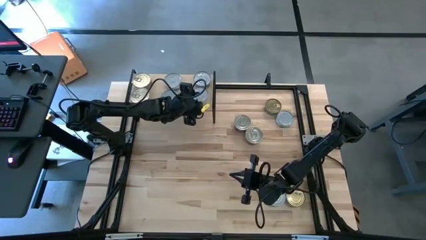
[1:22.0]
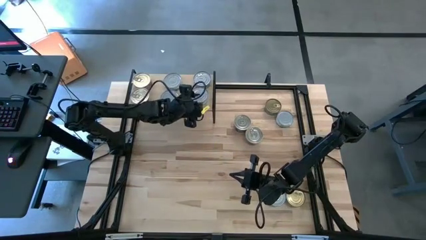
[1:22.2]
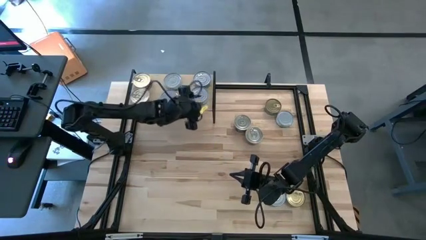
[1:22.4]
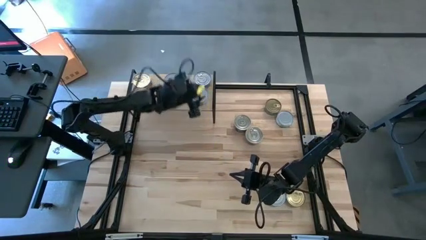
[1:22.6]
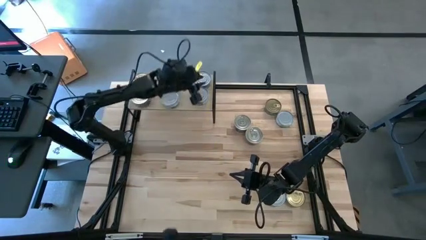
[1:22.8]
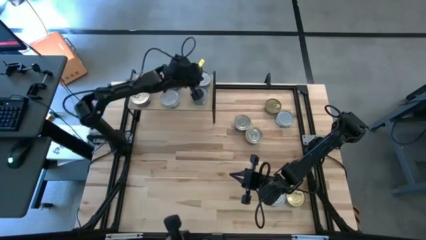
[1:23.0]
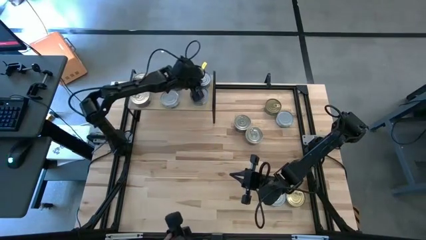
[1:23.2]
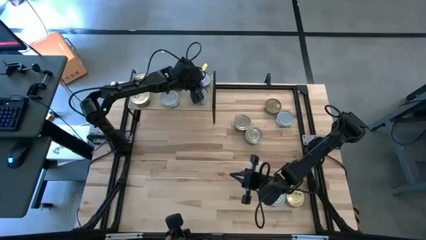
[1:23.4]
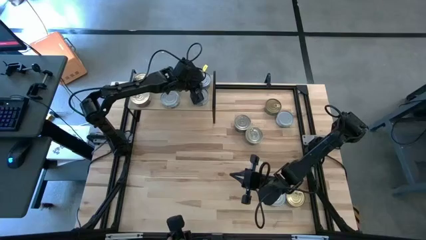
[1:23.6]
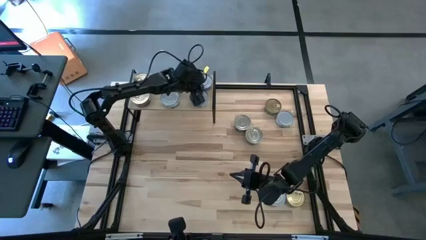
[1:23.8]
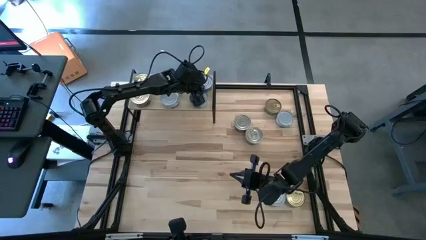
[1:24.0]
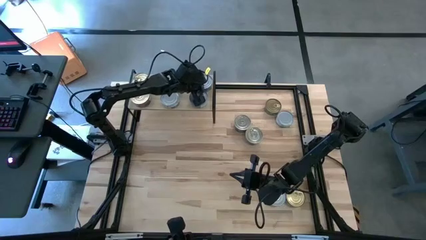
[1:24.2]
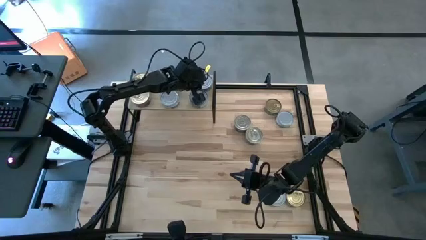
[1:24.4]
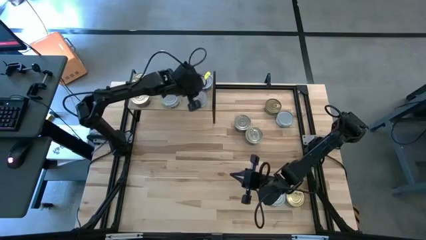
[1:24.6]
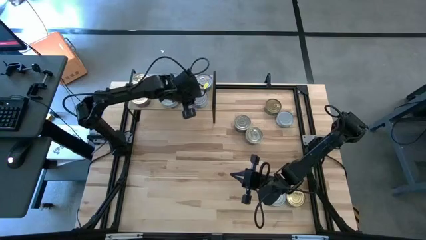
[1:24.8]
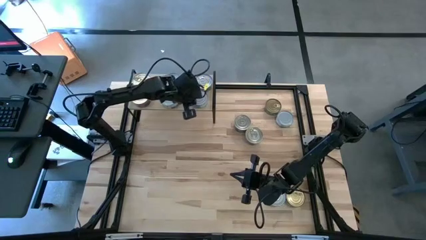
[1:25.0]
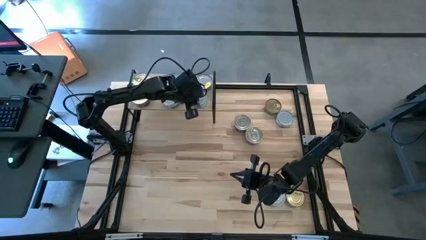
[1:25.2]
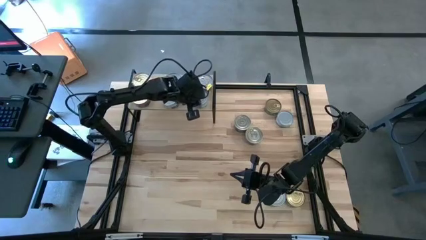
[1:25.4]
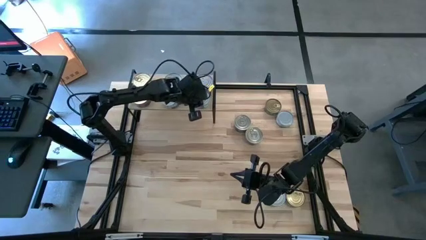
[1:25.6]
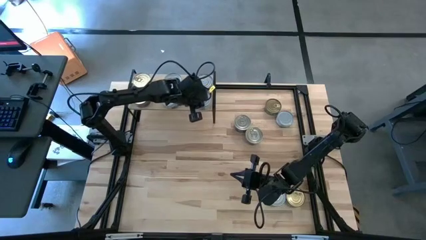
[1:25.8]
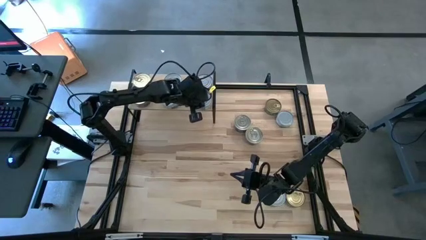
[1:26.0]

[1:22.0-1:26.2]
Task: Stack canned seafood by type on shelf
Adjust the green blue tuna cans on the shelf

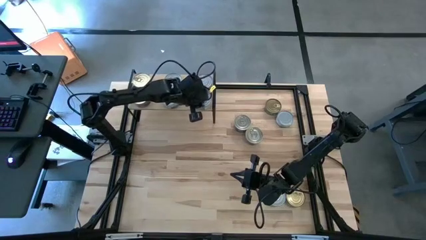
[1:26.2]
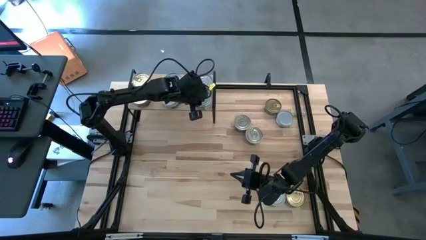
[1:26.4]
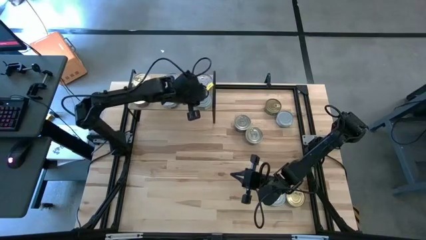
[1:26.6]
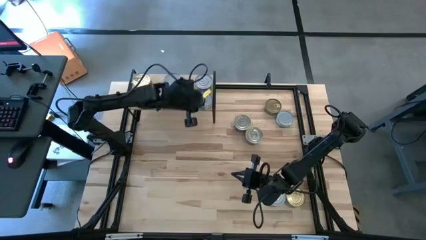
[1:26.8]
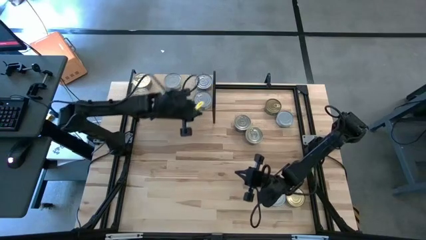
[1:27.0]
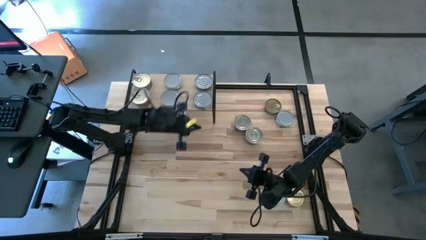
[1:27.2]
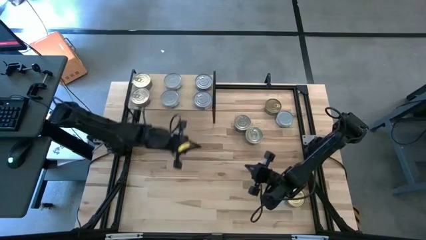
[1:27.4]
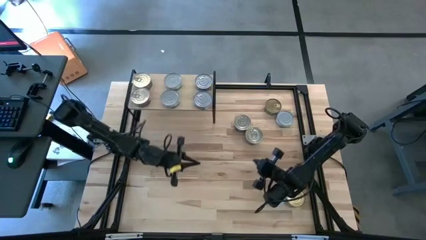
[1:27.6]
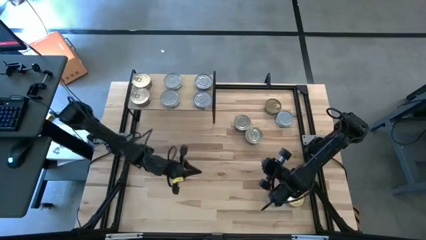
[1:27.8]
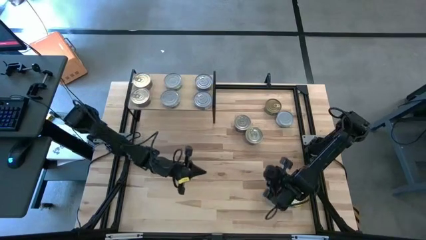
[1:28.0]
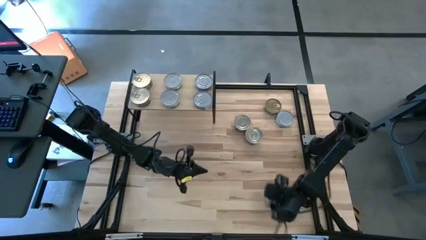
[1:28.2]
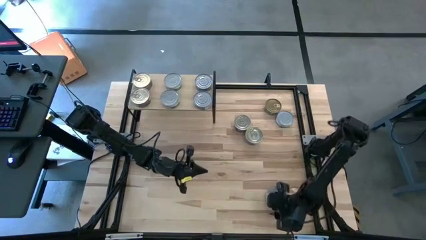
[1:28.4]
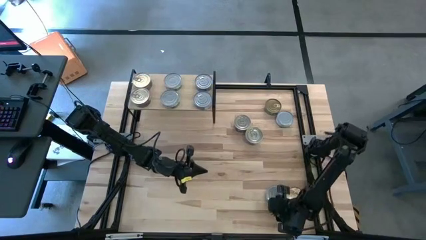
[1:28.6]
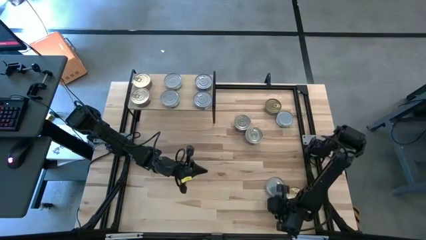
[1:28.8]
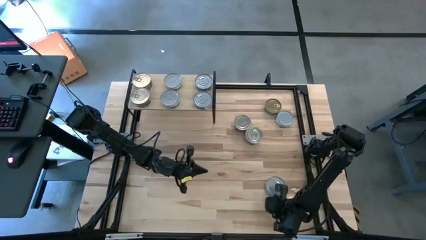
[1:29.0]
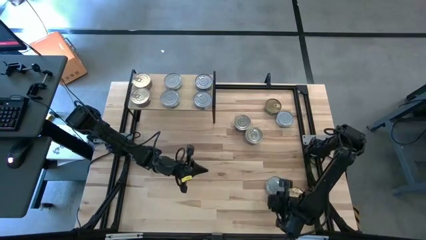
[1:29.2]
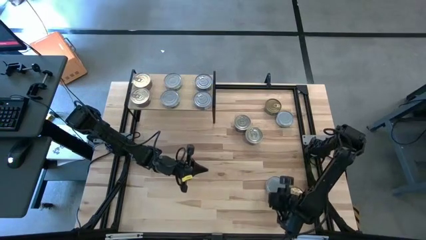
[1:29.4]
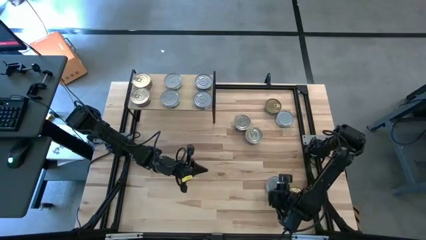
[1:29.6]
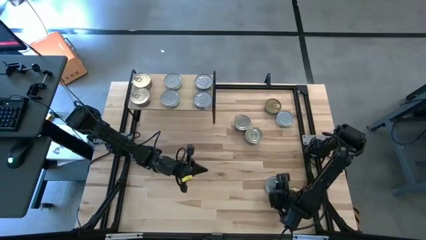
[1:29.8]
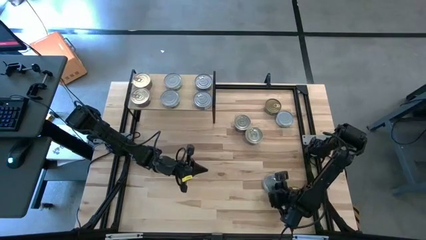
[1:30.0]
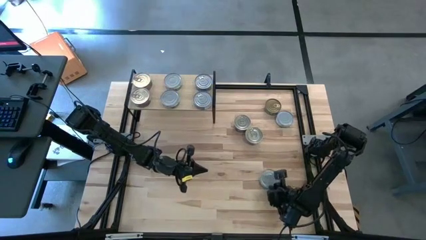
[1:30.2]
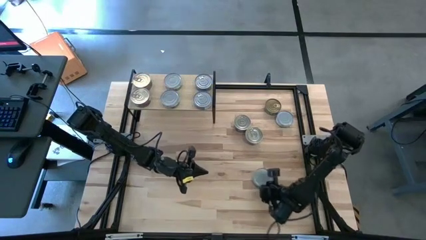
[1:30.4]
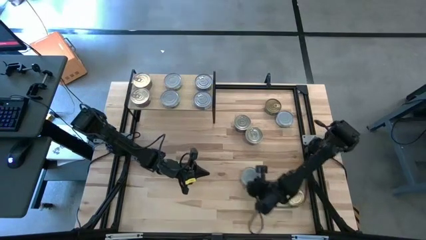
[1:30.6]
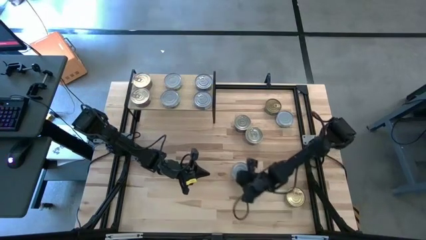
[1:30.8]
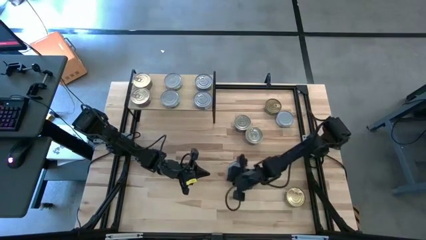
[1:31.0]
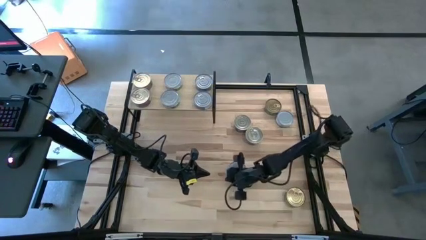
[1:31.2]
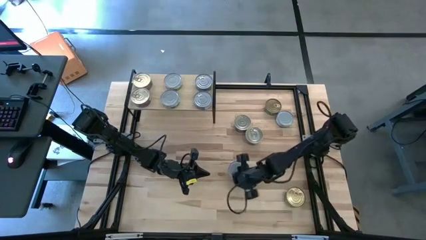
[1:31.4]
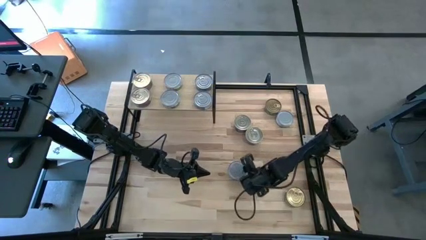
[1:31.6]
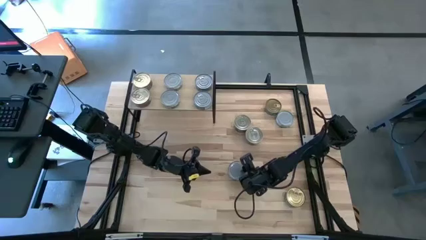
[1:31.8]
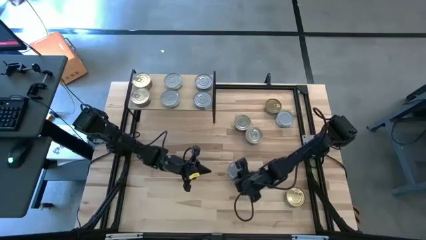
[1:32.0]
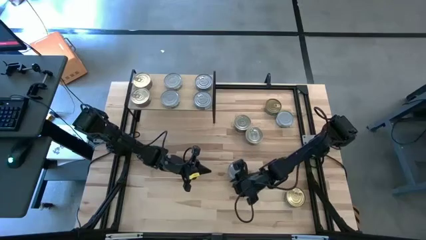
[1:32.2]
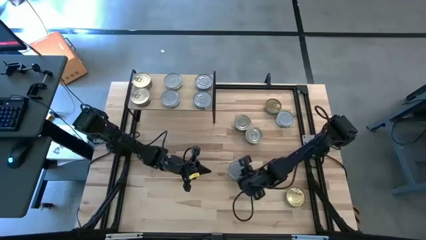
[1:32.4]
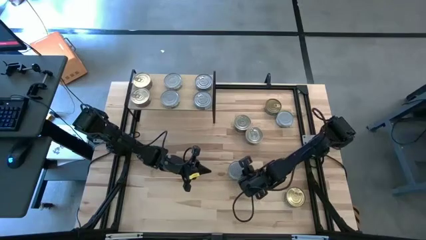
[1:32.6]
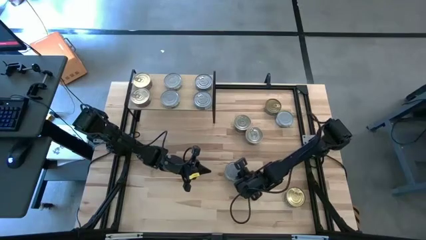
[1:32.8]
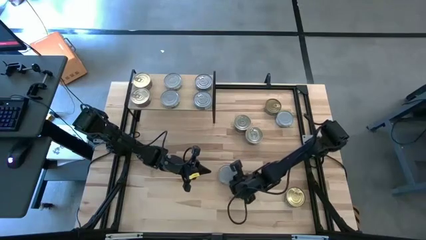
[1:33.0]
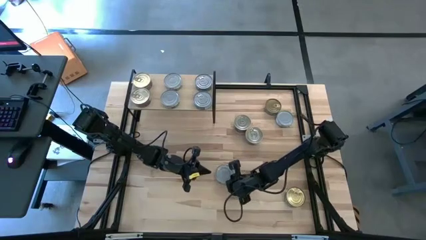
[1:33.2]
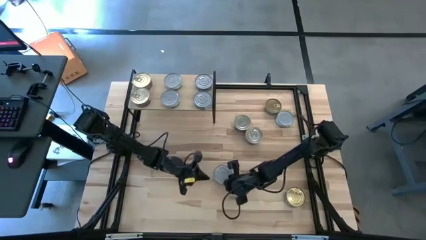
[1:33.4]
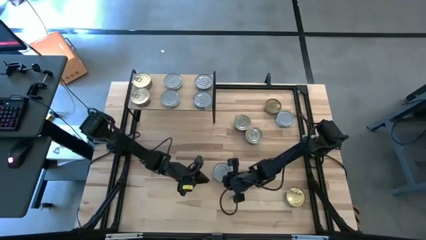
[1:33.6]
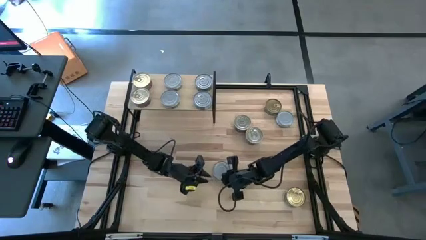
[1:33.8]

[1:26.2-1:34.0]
Stack the green white tuna can on top of the other green white tuna can on the shelf

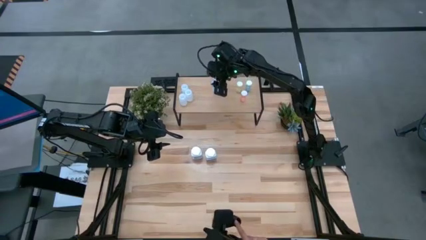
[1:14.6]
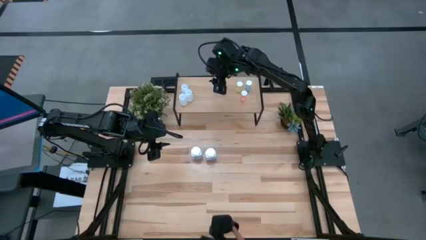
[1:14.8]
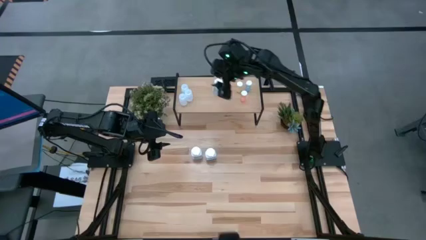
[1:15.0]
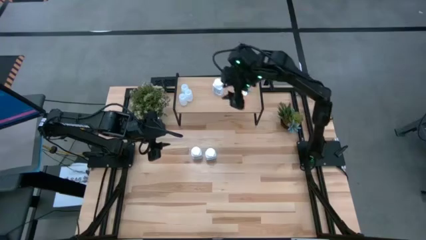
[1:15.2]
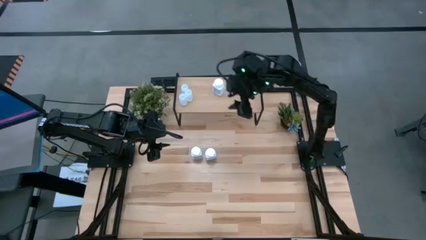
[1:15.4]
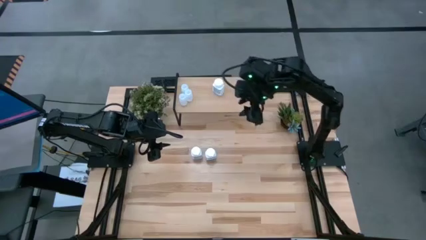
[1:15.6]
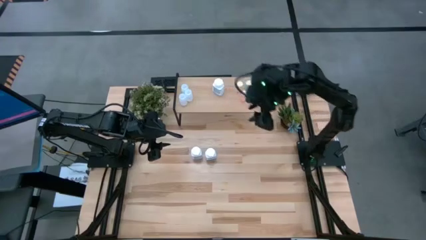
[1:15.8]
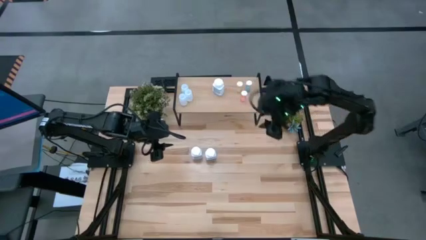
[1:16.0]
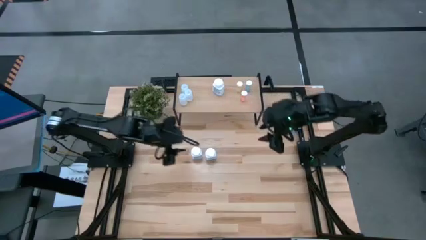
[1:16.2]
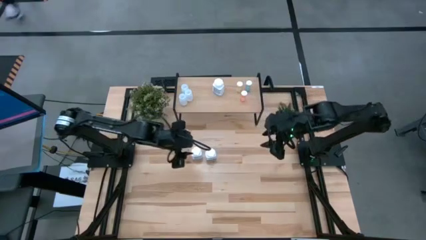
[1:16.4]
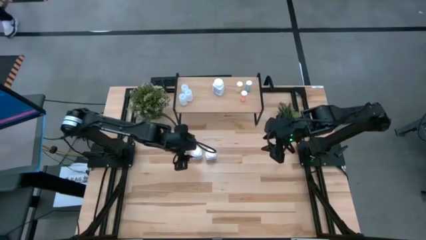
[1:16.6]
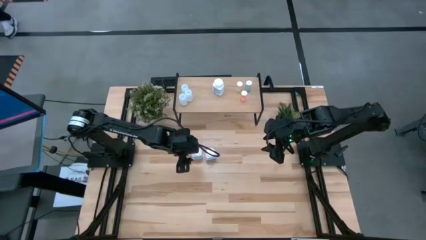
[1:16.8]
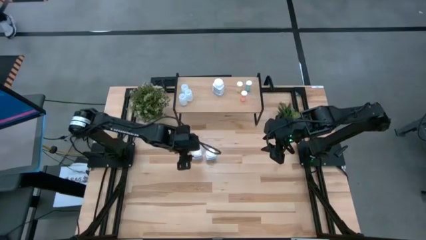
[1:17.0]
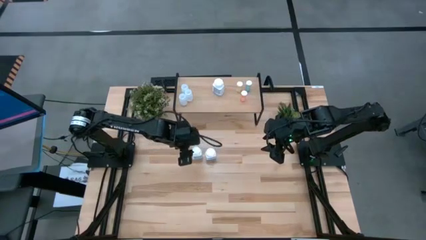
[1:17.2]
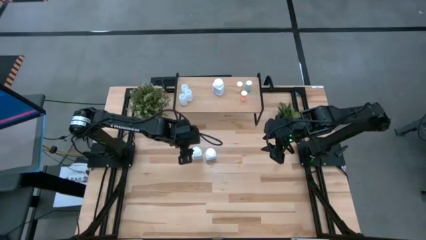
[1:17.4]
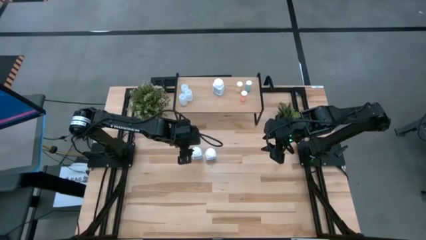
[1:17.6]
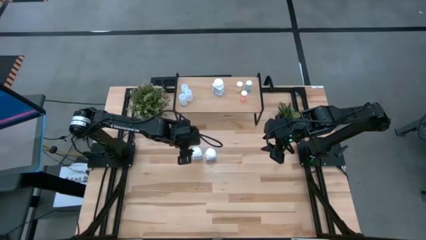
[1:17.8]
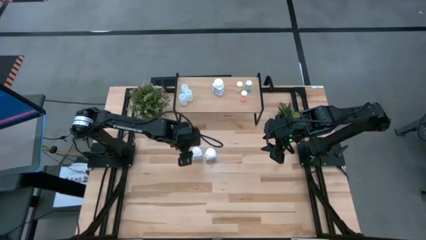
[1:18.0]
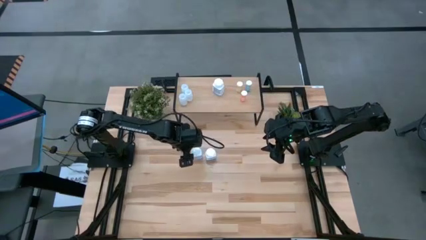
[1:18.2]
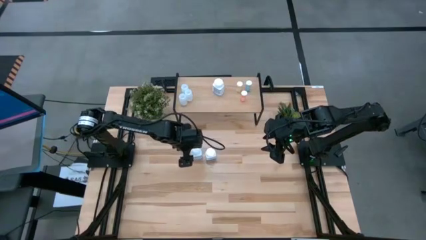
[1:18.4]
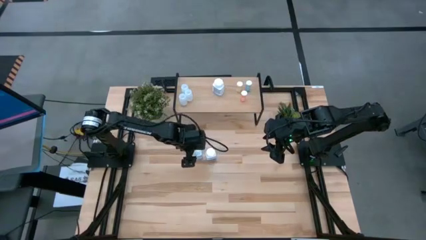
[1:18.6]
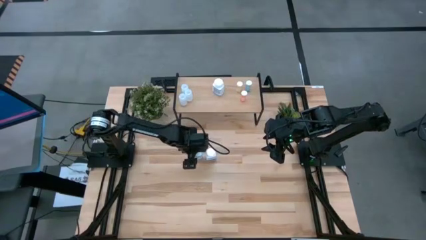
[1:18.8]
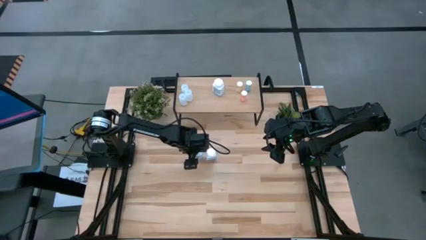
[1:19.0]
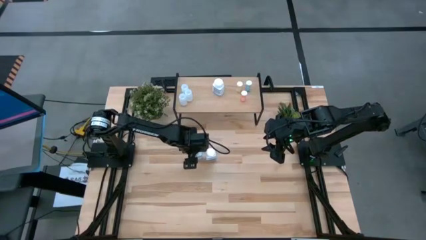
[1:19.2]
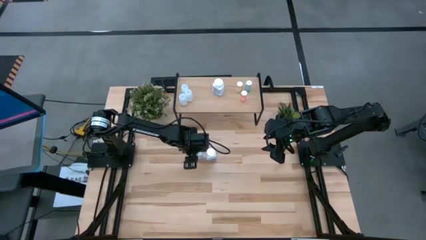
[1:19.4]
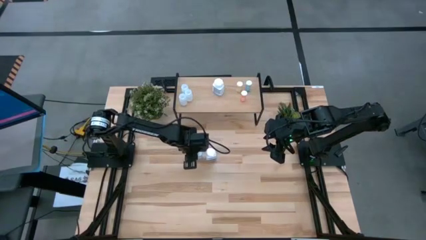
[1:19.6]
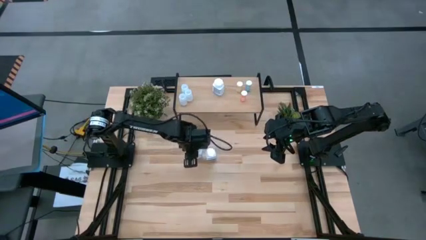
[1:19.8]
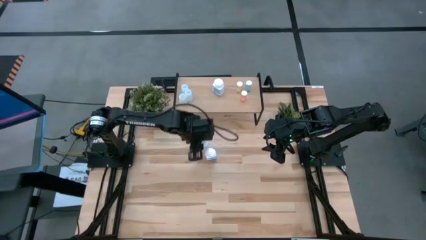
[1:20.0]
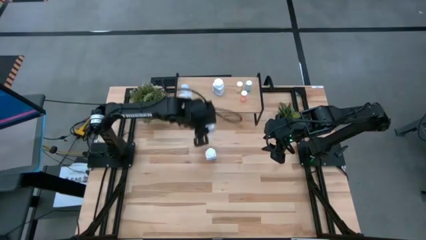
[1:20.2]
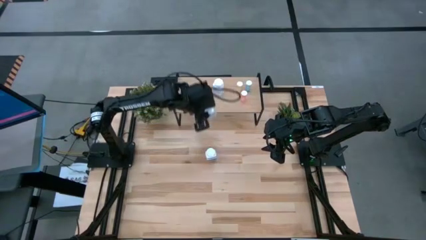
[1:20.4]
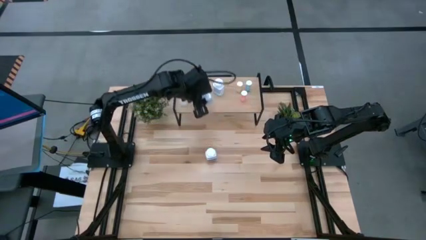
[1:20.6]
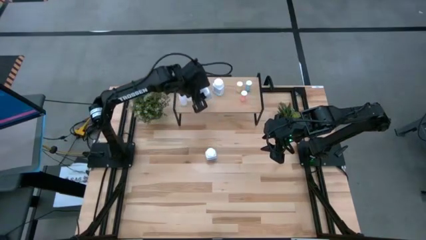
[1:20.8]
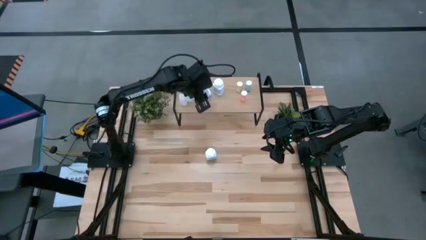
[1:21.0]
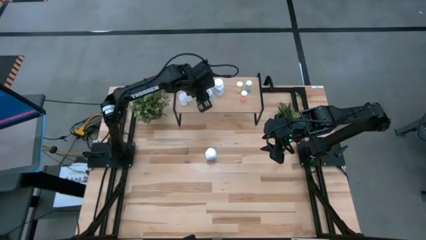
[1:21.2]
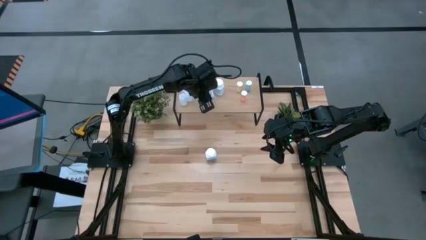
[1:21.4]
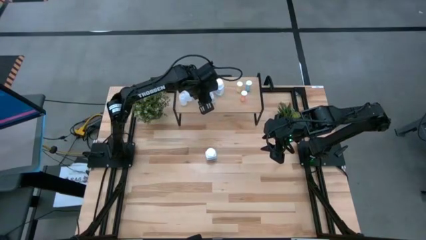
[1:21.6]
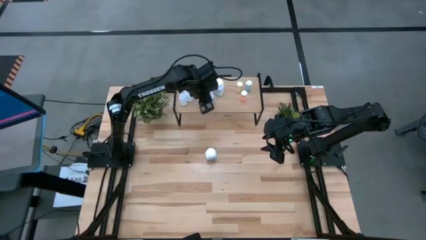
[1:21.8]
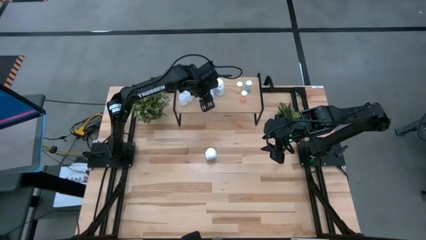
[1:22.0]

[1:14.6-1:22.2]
Task: Pick and place medicine bottles onto shelf by color
Put the left white blue pill bottle on the shelf
